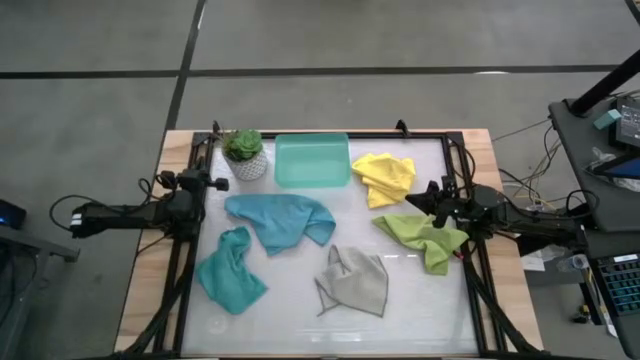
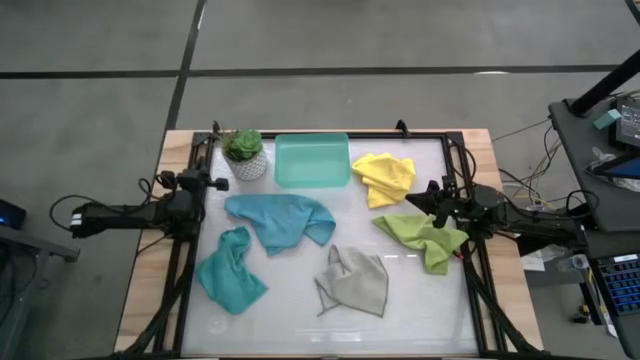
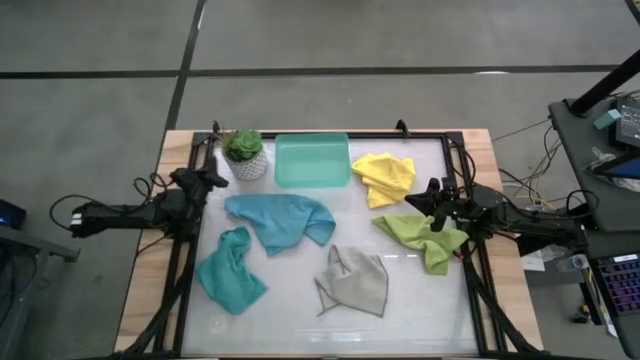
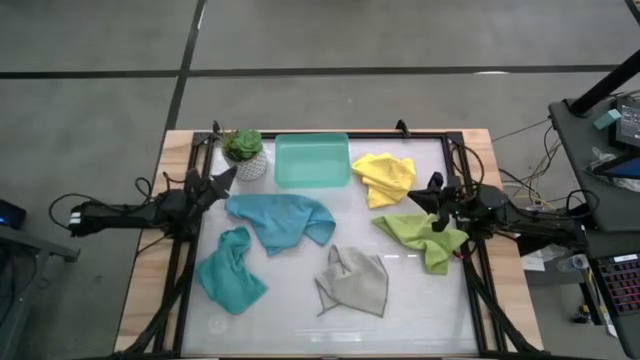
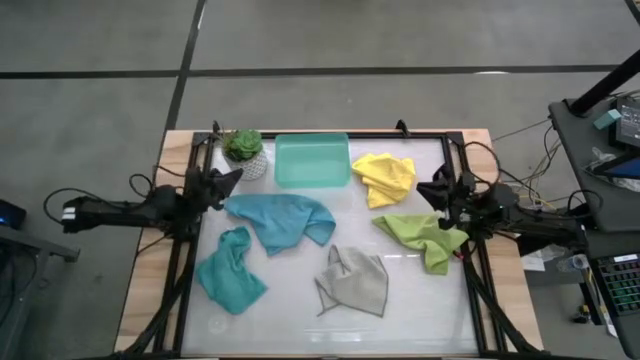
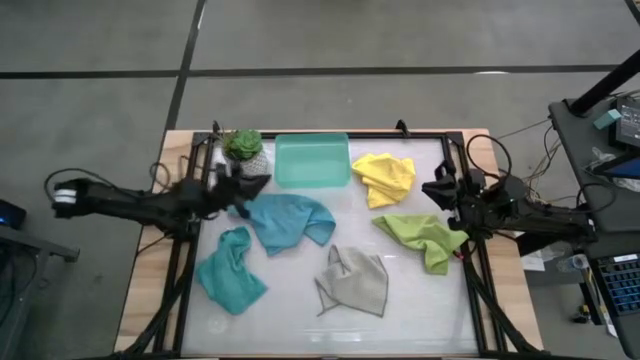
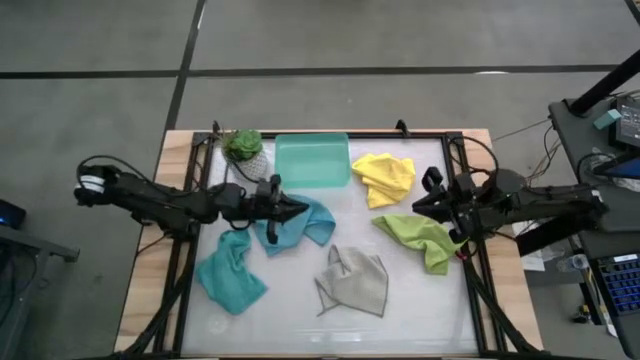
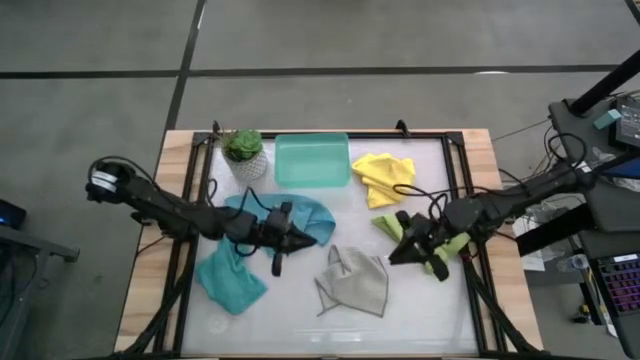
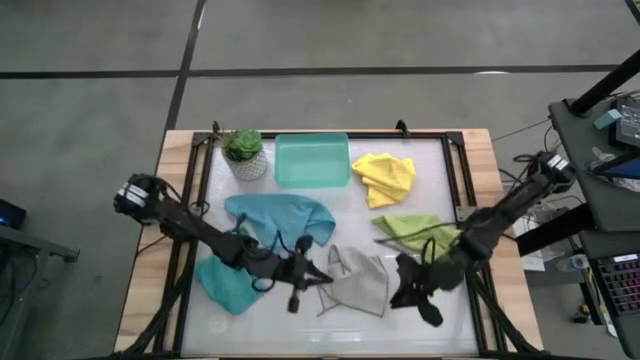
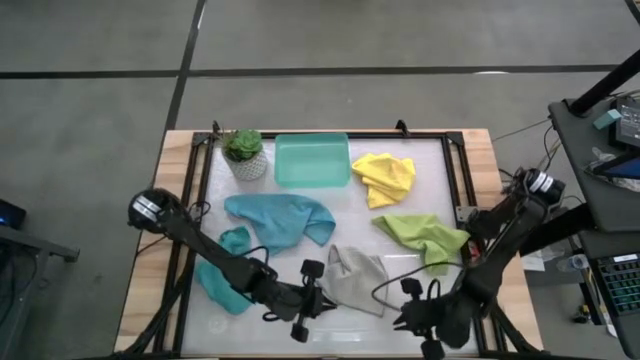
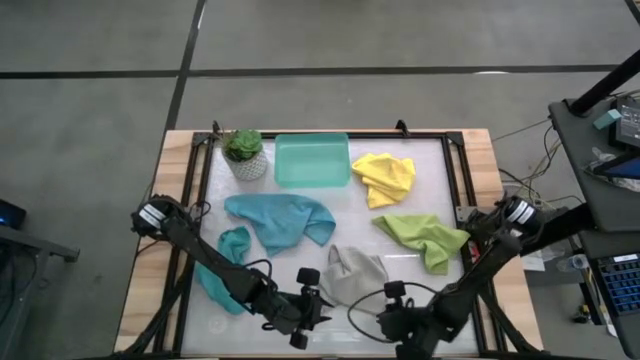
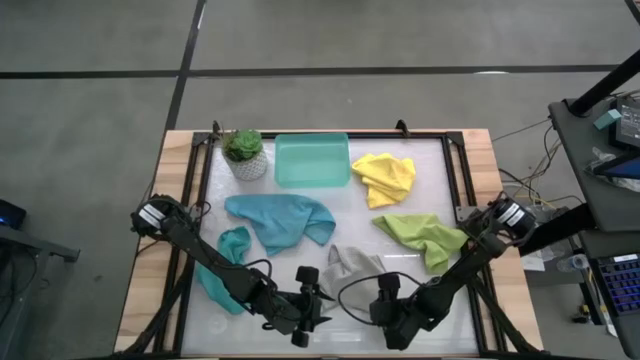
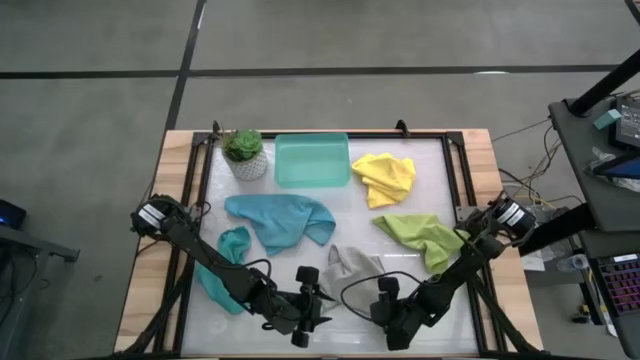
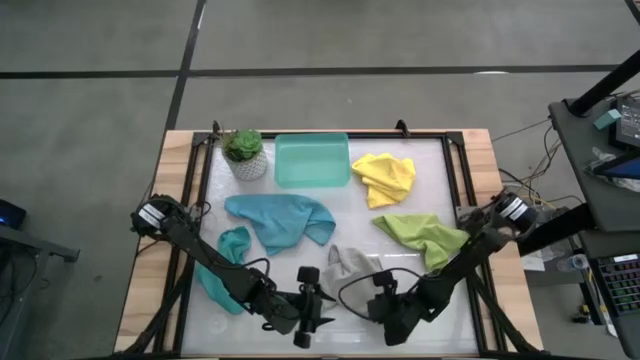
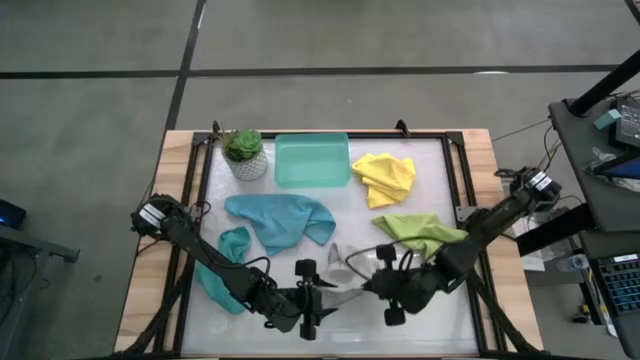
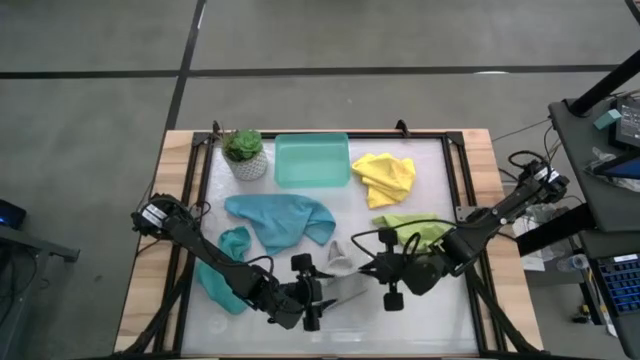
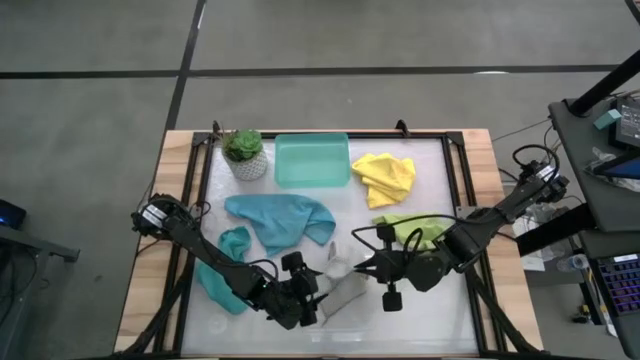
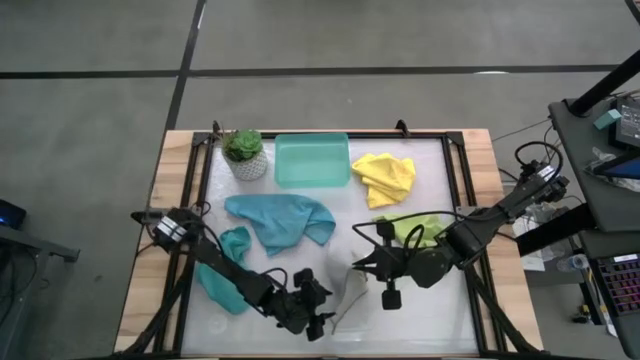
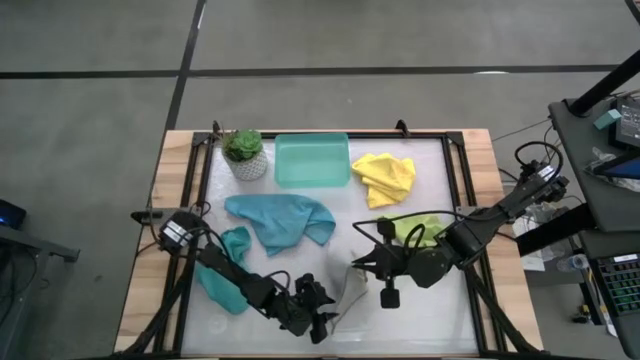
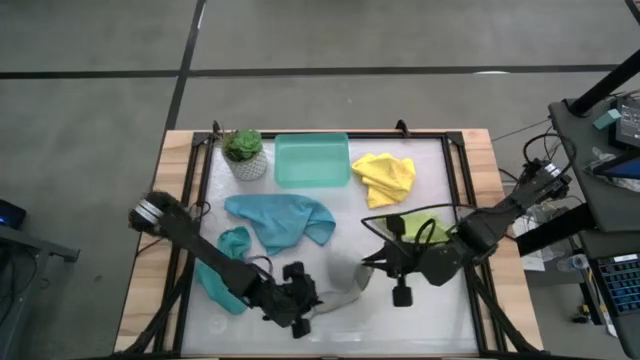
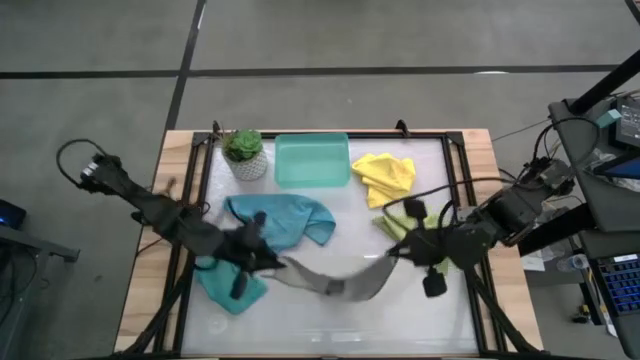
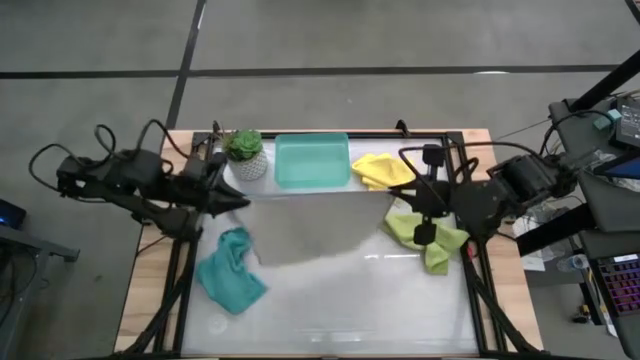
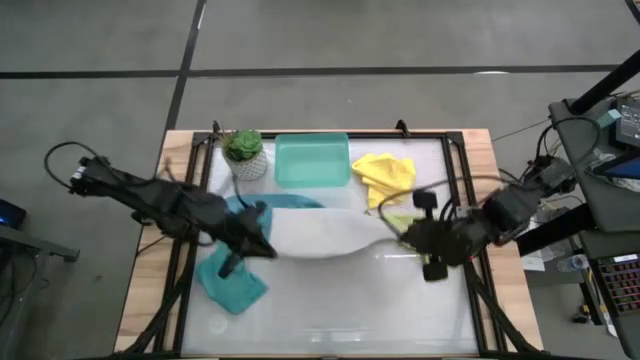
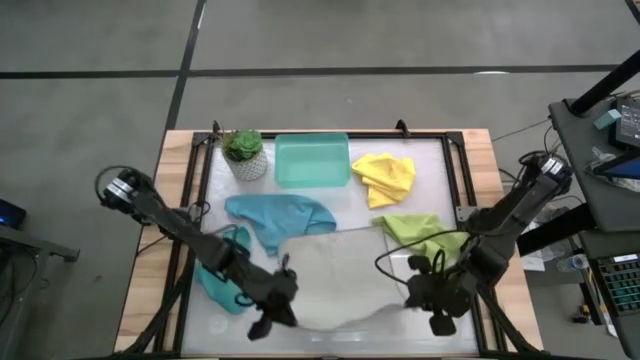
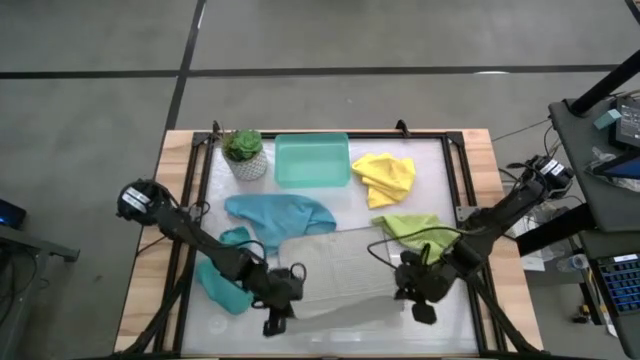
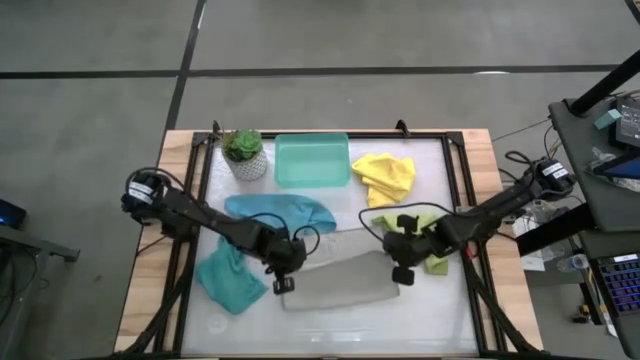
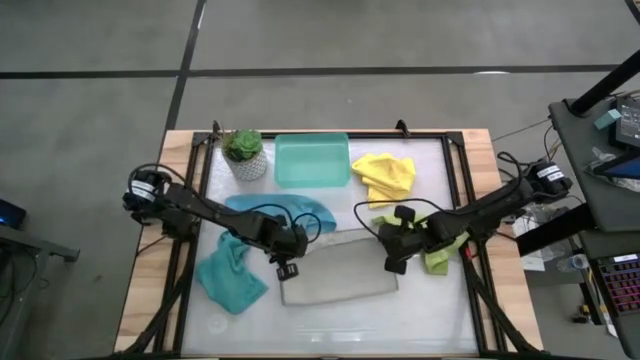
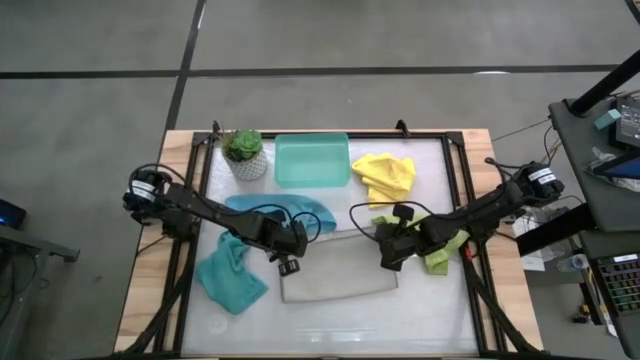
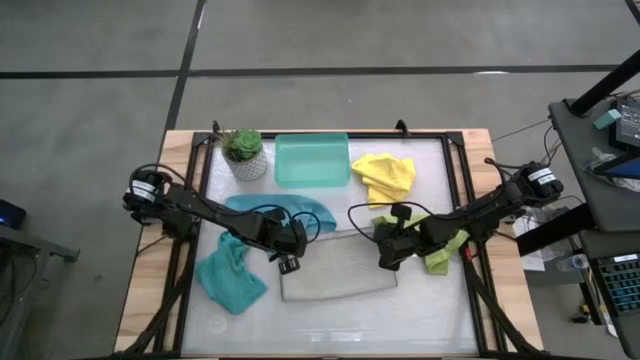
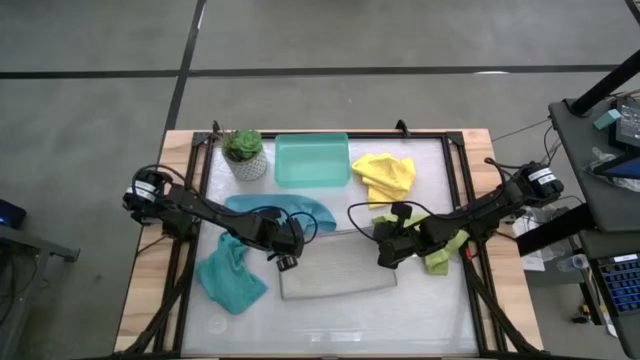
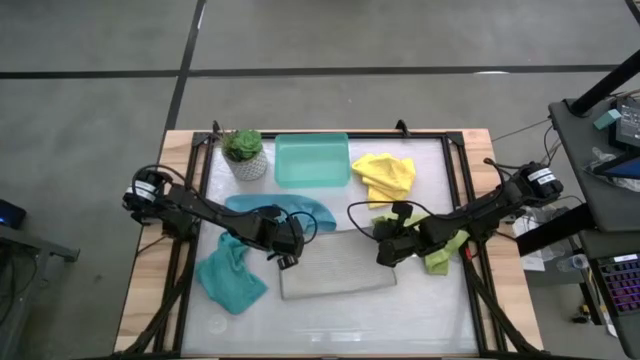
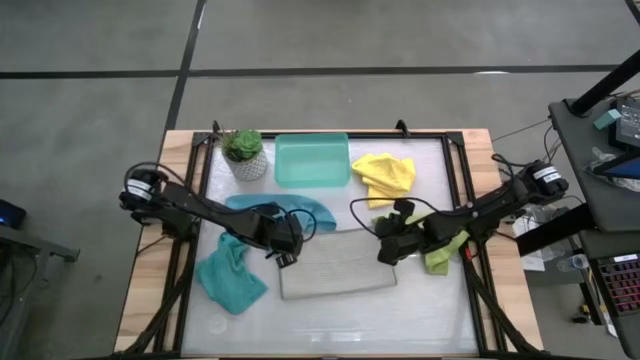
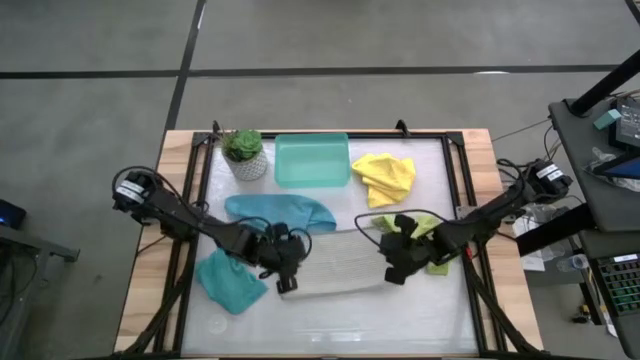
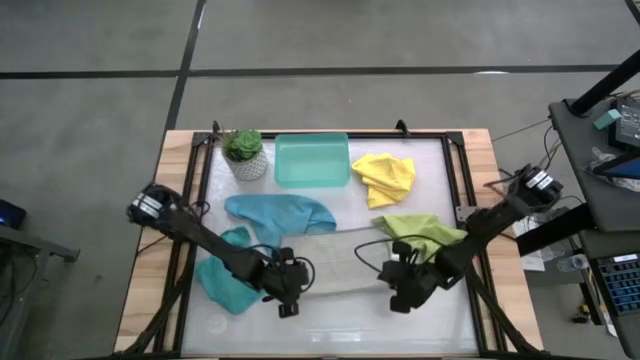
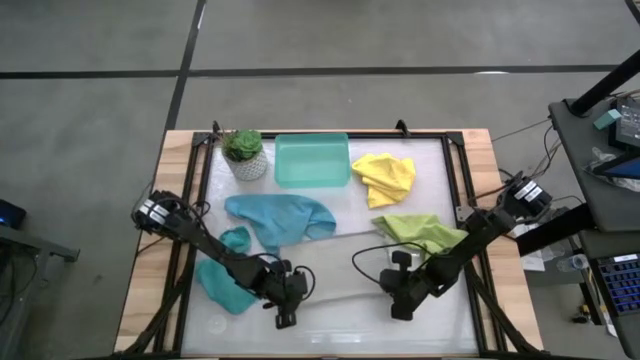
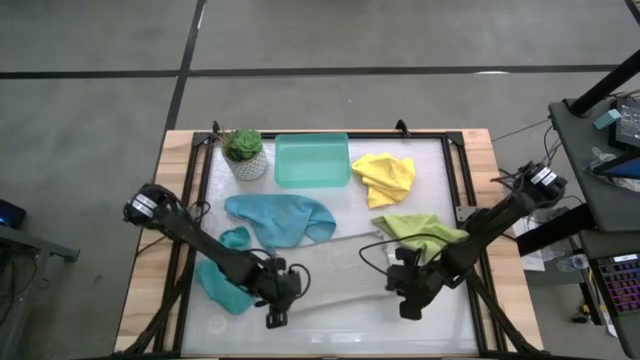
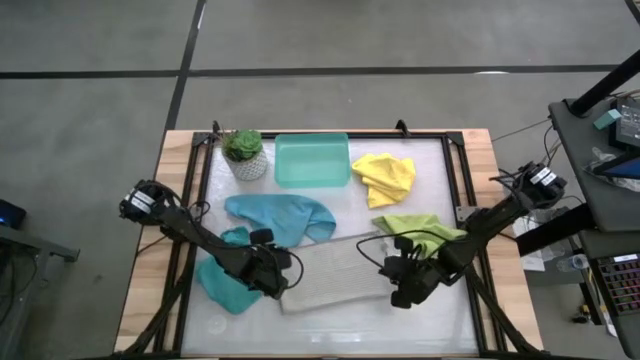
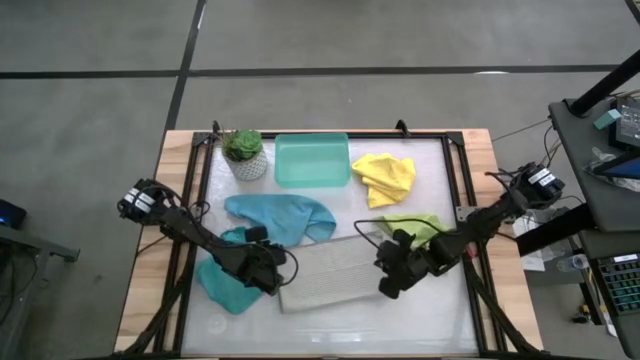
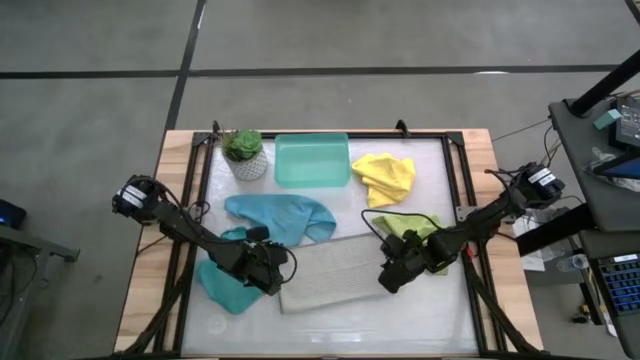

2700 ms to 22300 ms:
Task: Fold microfiber towels
Fold the gray microfiber cloth
